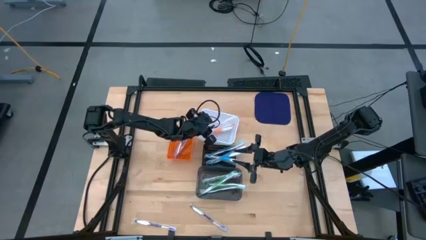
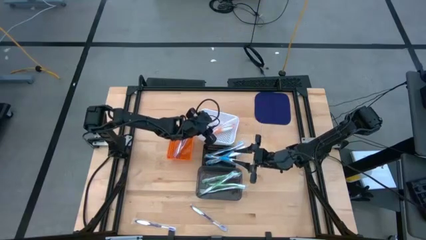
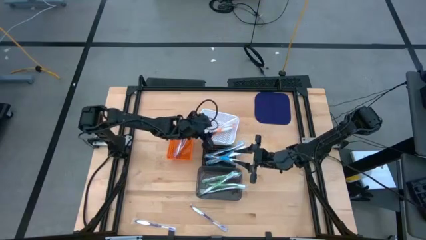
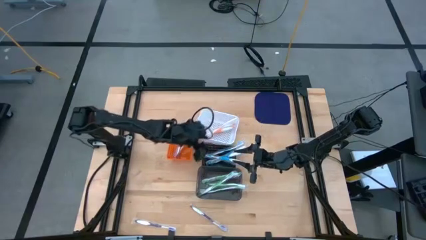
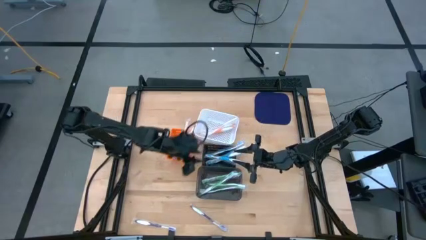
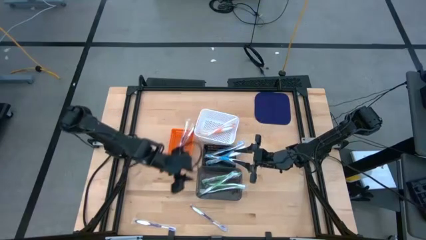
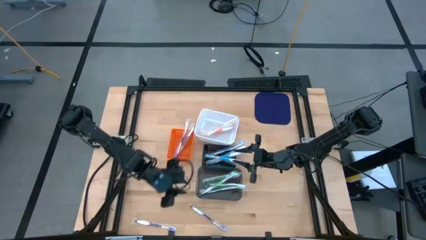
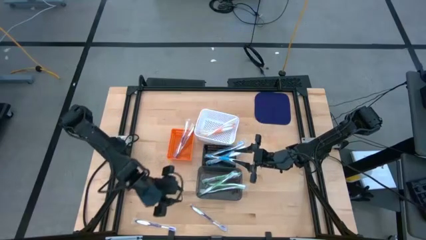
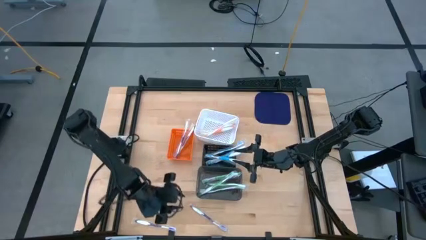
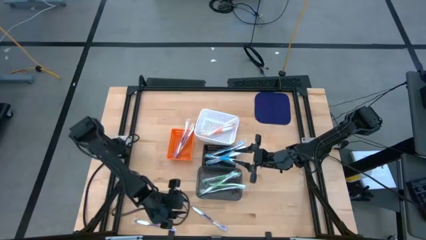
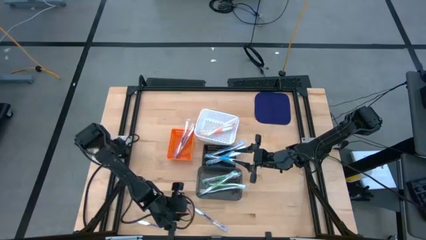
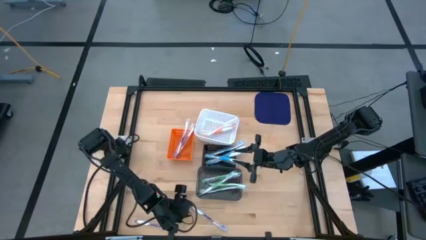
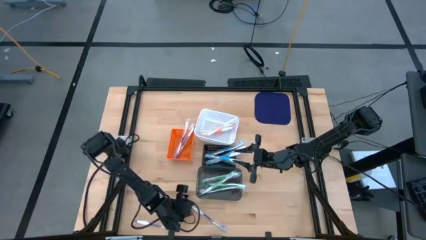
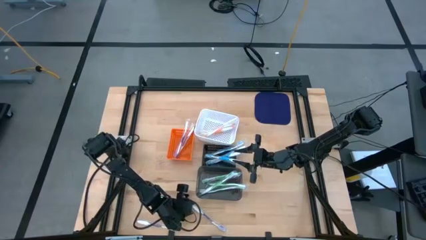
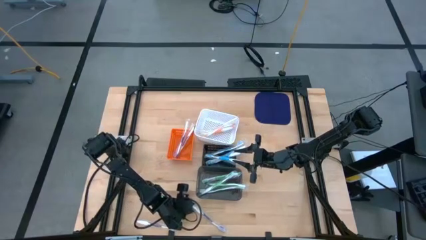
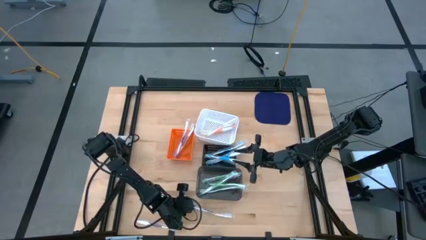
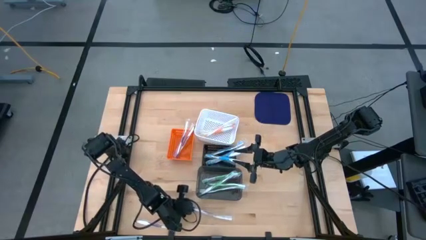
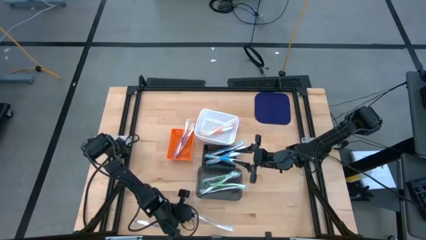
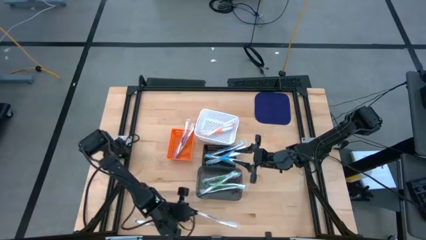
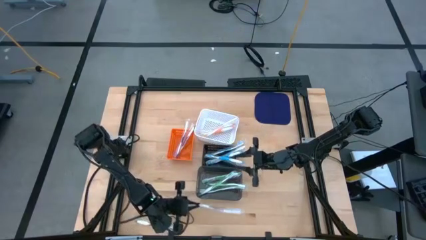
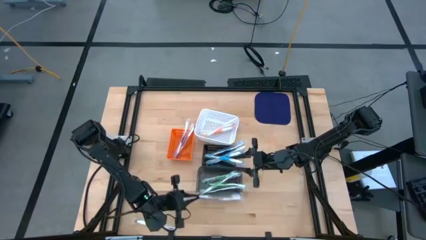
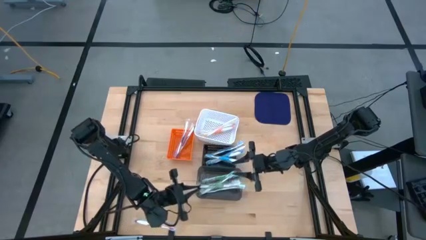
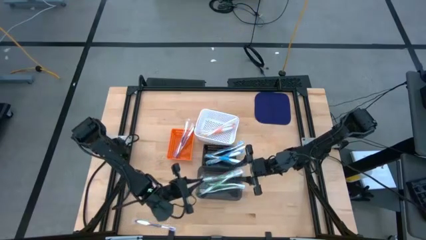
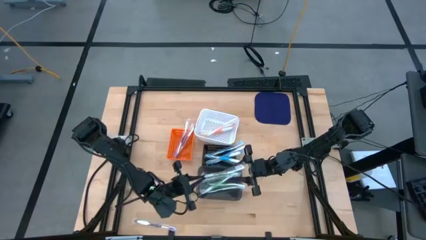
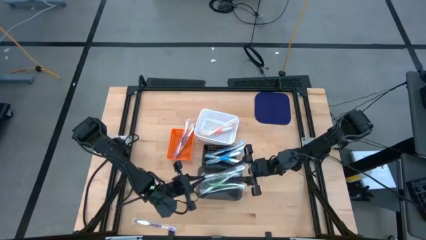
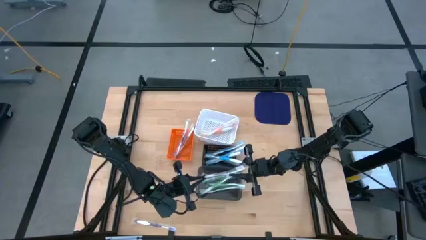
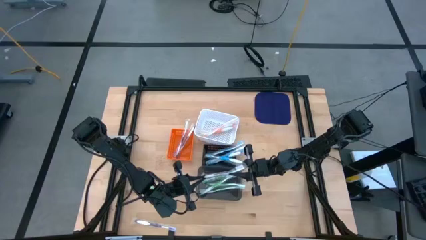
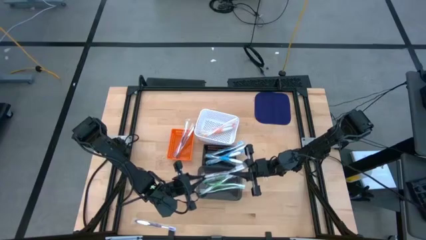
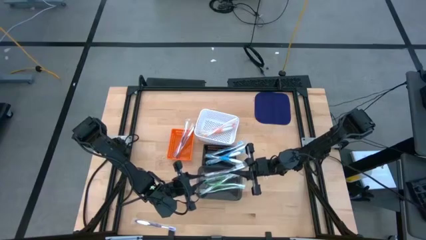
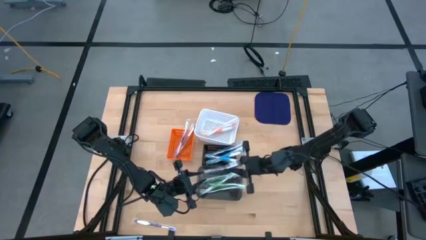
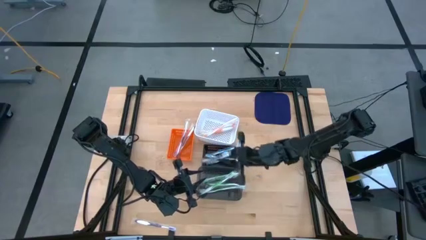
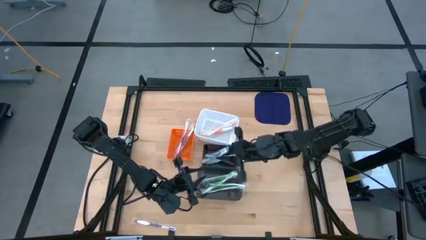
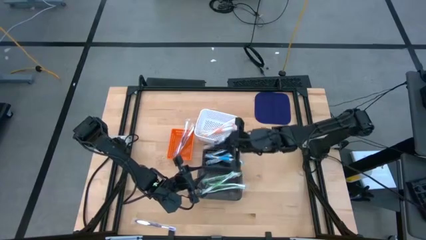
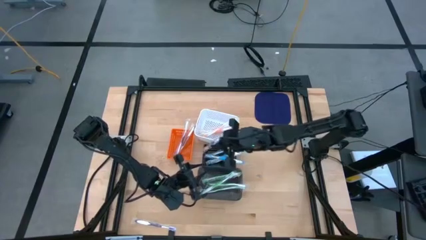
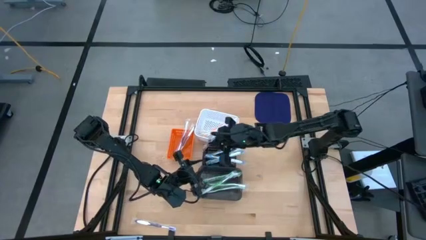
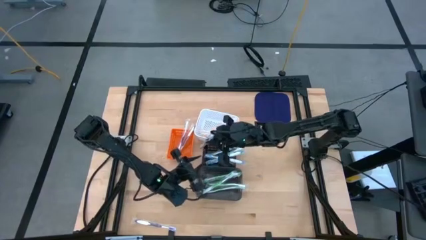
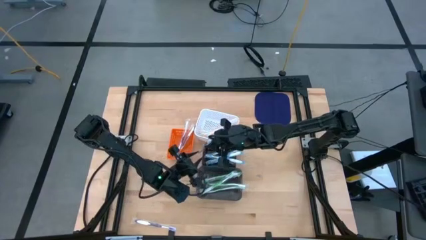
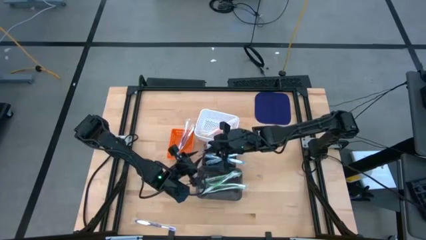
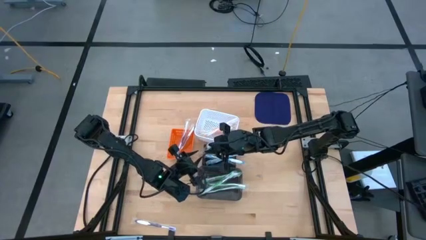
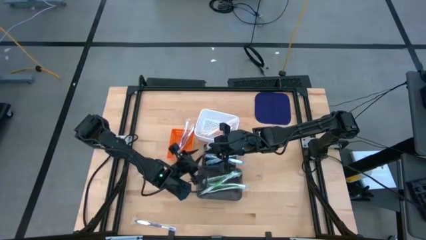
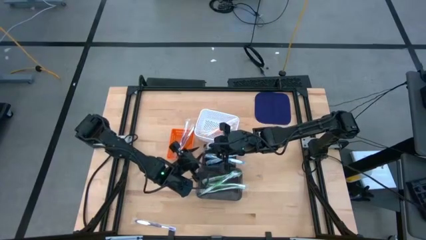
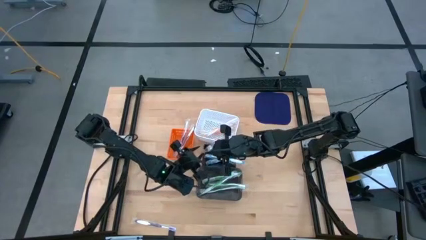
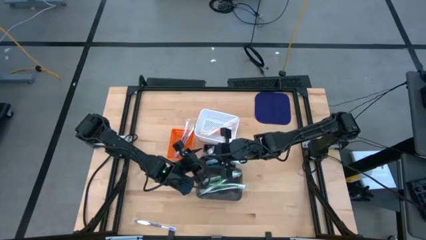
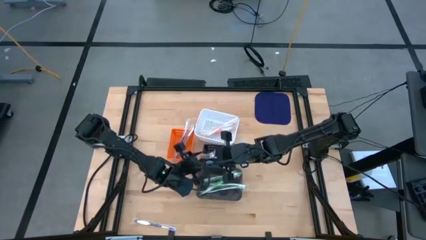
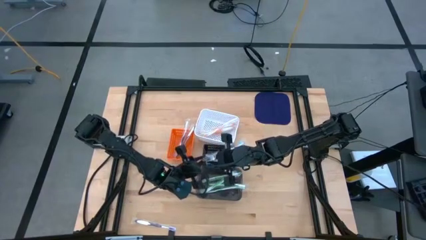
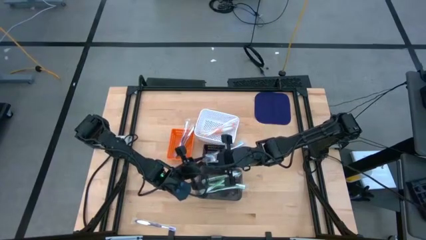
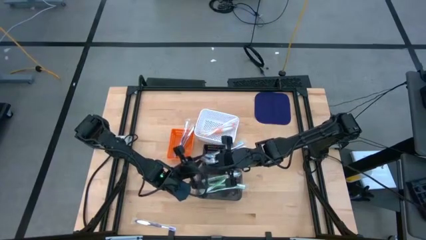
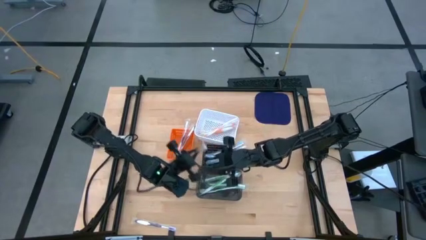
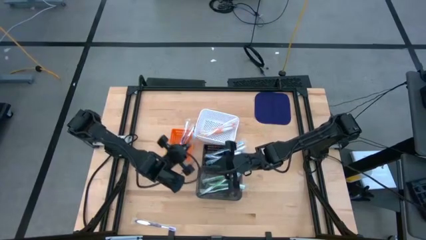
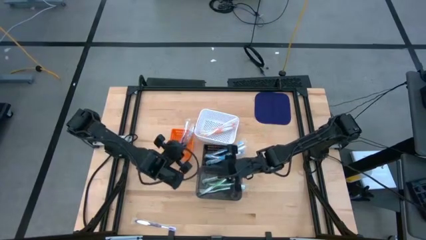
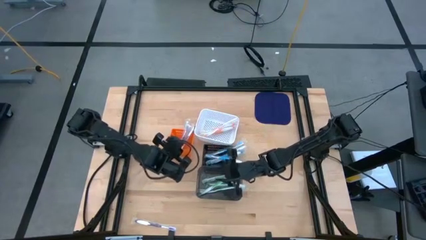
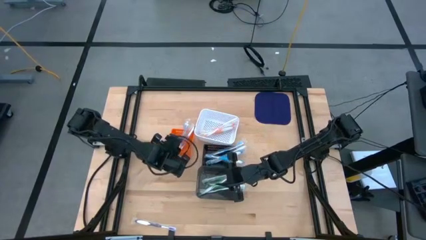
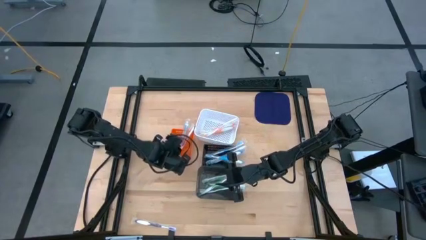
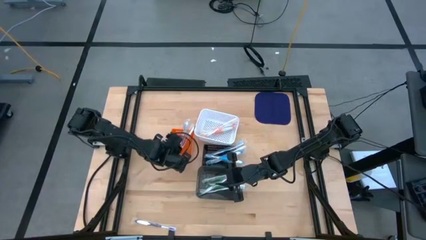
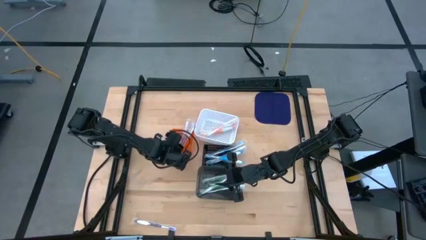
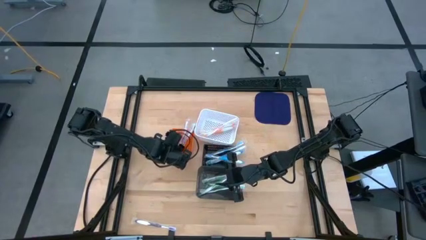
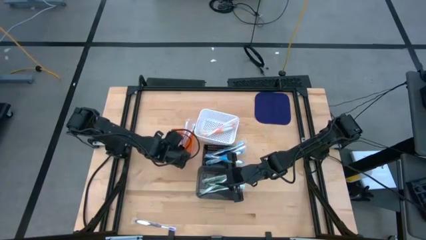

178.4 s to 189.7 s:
Task: Pick & Place Toothbrushes
Put the right purple toothbrush into the orange basket
